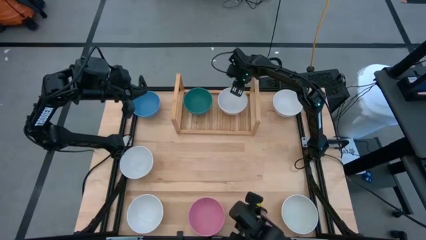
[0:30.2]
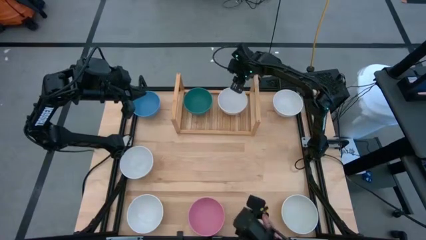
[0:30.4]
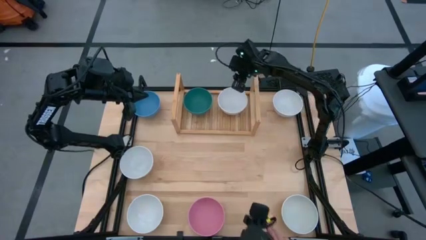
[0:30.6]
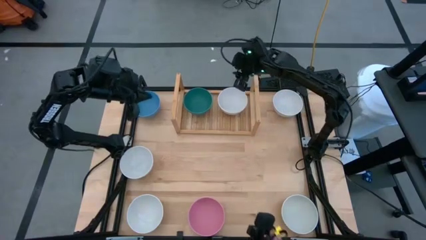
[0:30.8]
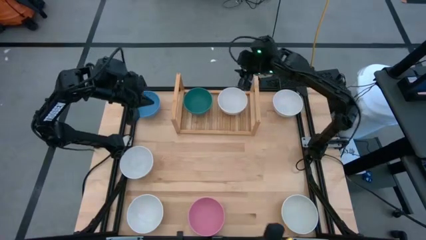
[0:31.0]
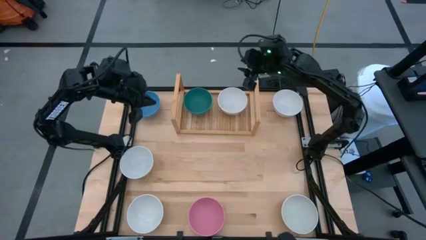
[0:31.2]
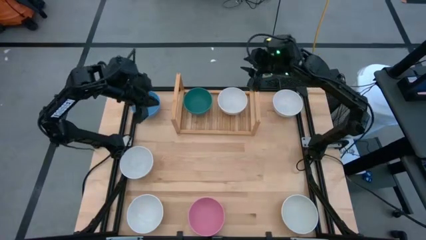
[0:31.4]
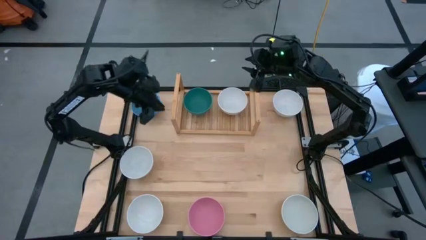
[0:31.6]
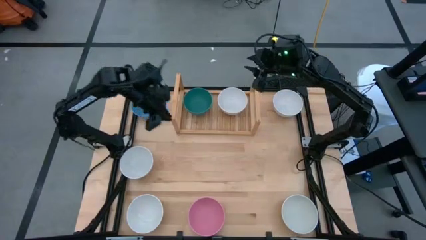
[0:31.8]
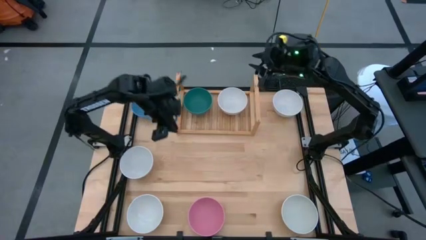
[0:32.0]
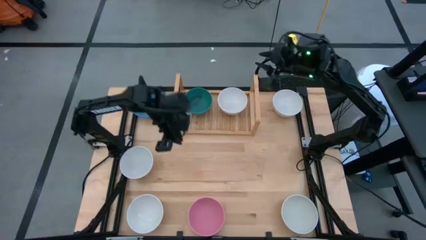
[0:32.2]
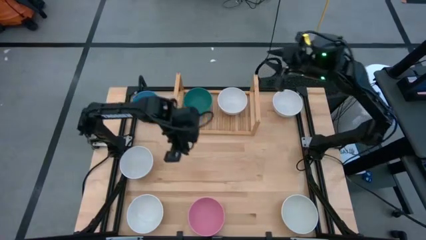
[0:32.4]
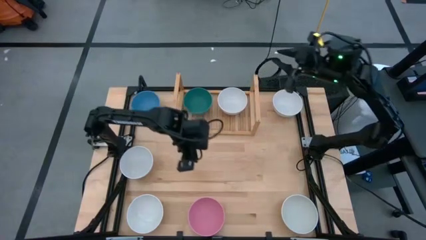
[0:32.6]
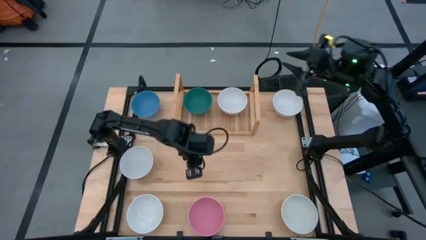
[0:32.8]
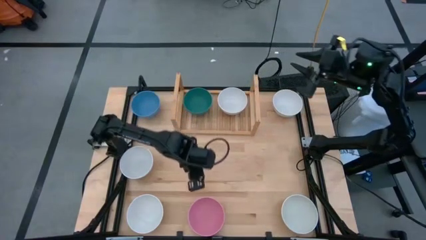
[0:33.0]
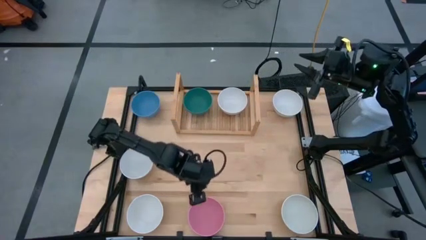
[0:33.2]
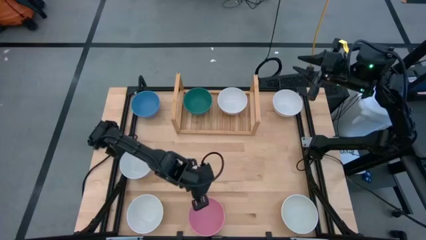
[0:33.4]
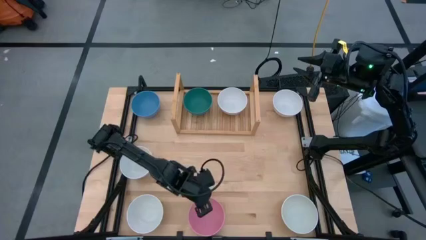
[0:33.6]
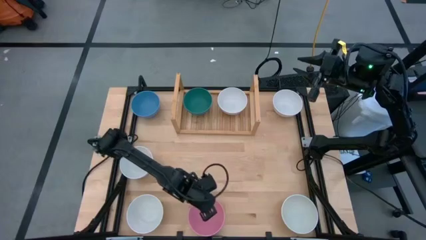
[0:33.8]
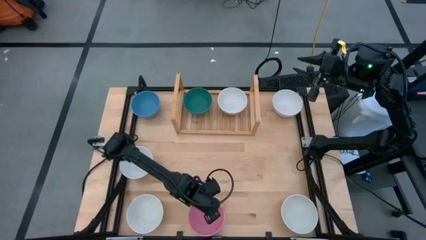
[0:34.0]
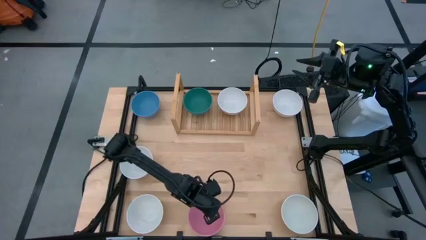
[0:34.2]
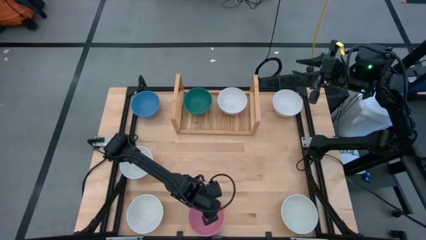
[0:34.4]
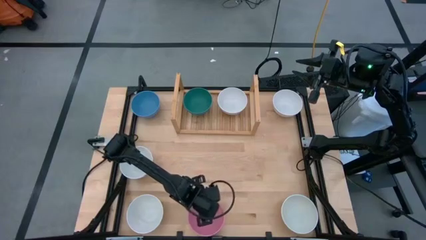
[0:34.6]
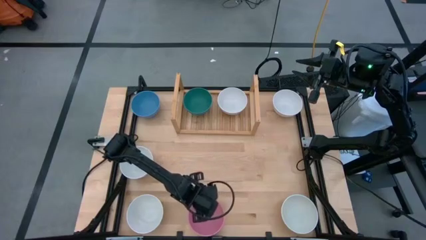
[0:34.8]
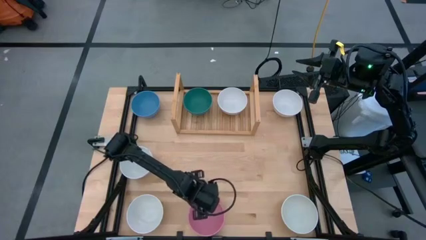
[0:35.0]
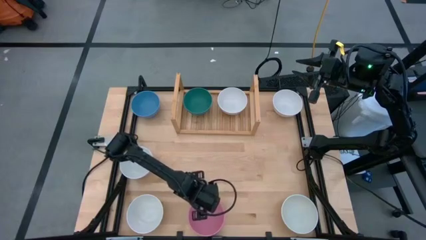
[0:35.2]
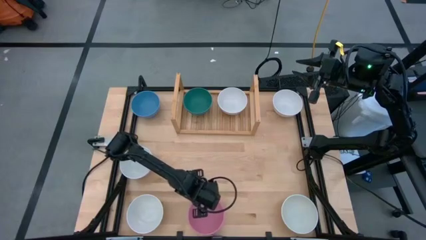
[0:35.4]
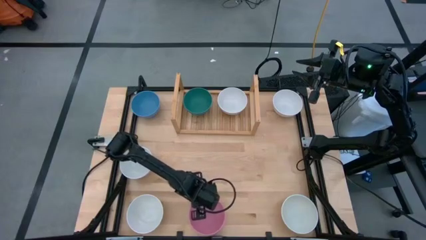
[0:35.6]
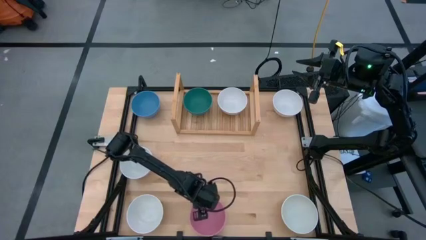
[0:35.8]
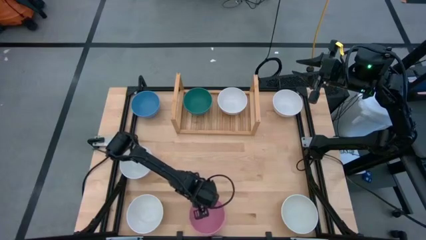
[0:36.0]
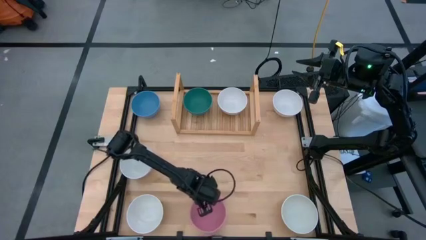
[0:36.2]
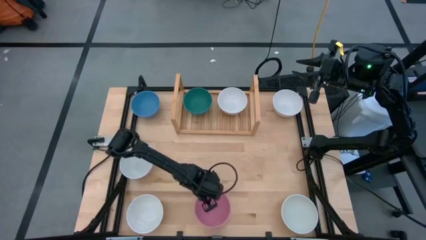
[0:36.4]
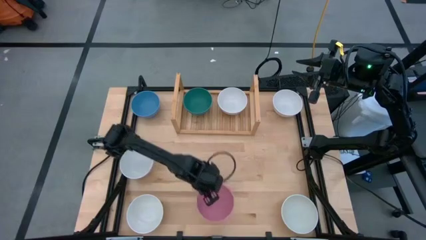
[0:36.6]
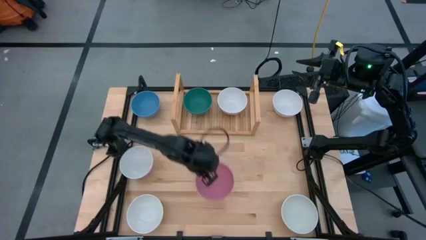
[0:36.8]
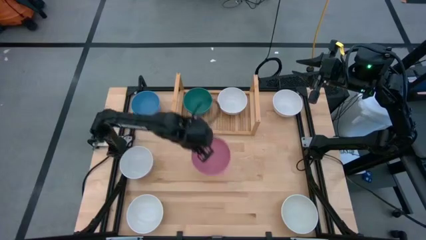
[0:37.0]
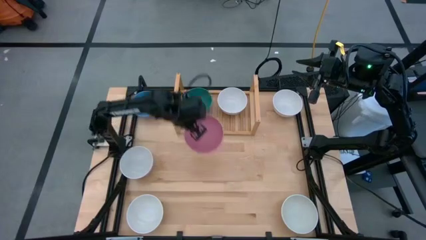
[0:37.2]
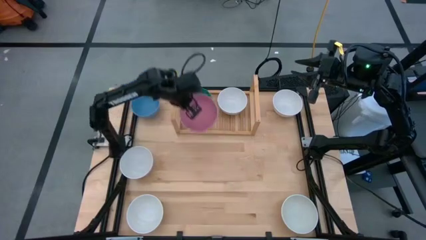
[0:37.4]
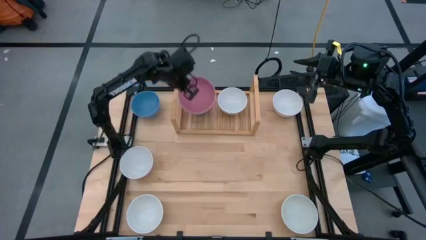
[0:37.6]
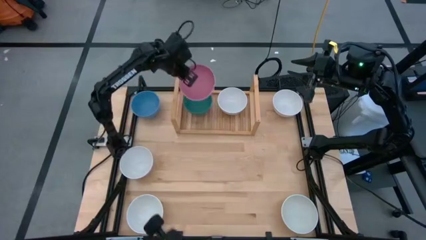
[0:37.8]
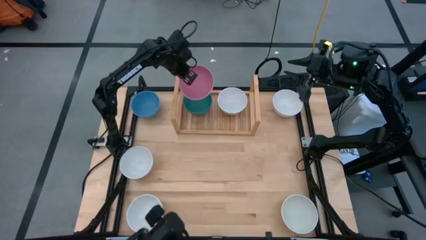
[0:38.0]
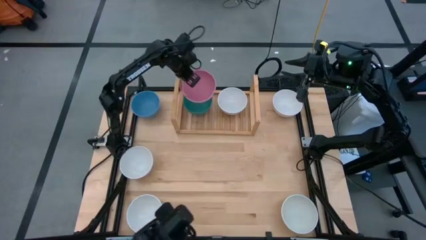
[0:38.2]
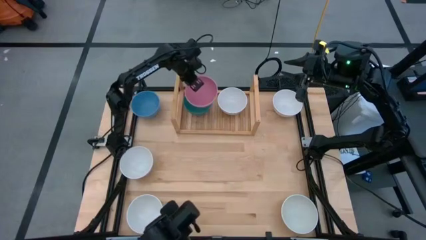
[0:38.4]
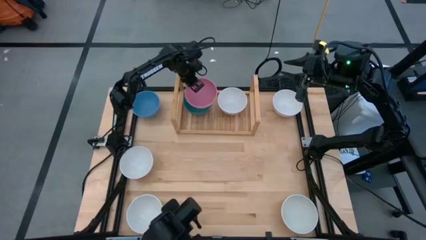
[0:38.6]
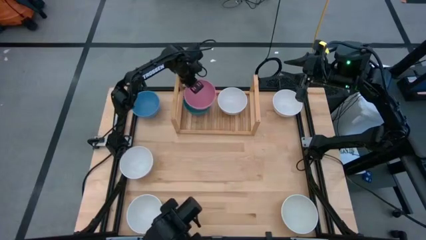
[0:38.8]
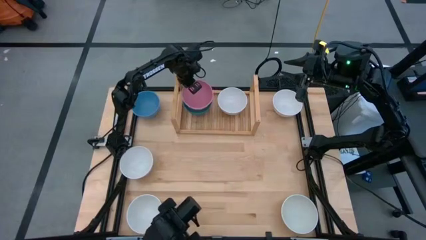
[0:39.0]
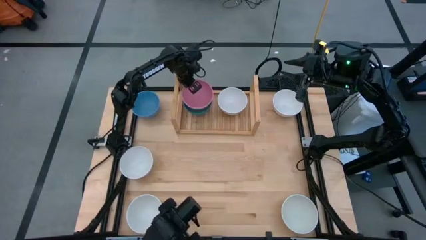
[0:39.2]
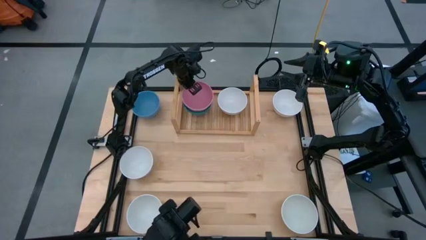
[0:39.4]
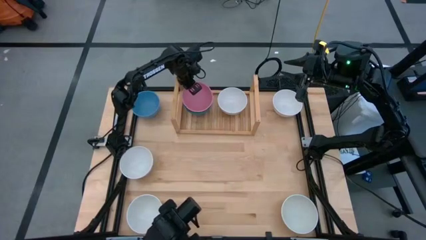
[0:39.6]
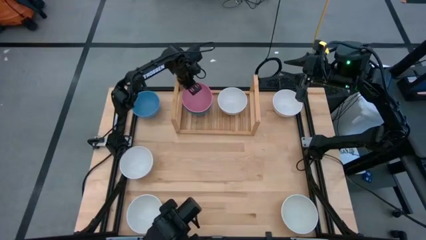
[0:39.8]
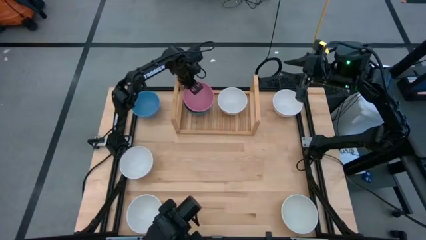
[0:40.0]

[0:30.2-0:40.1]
Task: Place and stack bowls onto a shelf
Stack the pink bowl on top of the dark green bowl on the shelf
